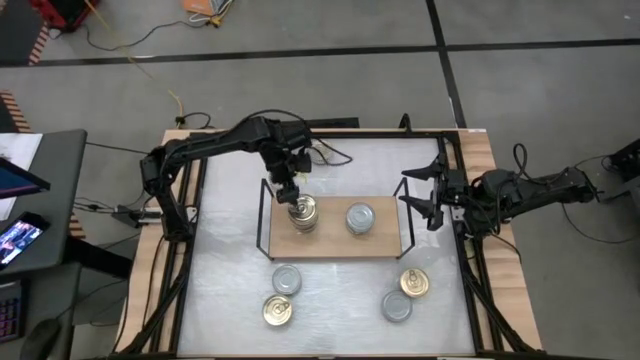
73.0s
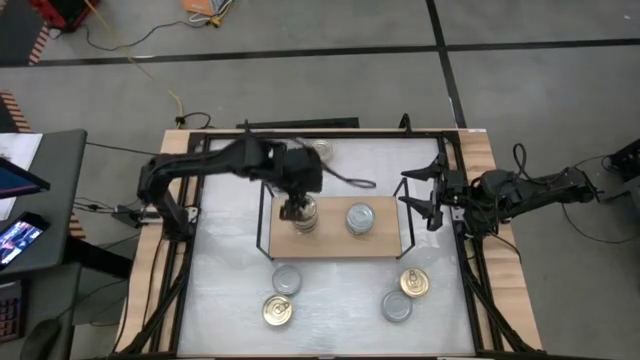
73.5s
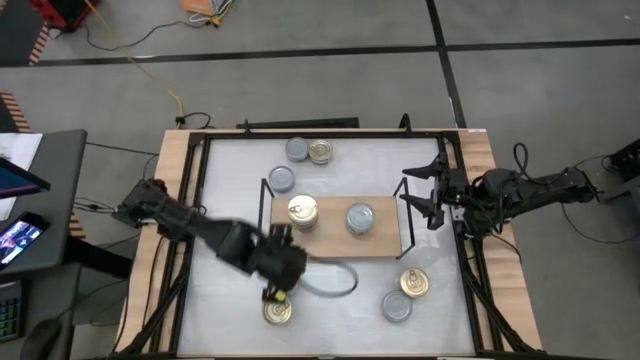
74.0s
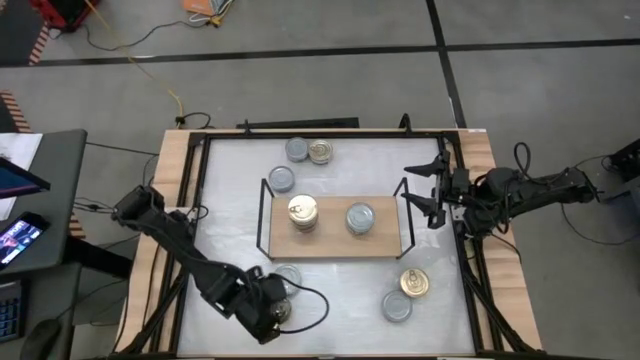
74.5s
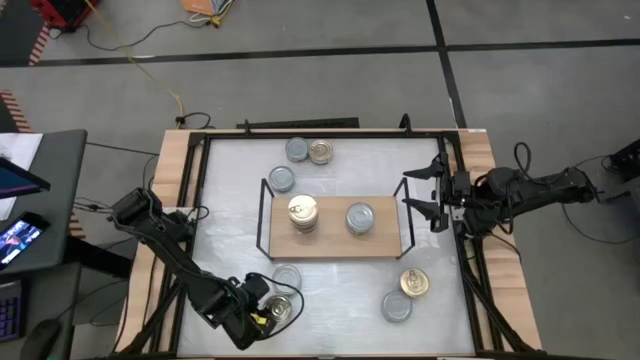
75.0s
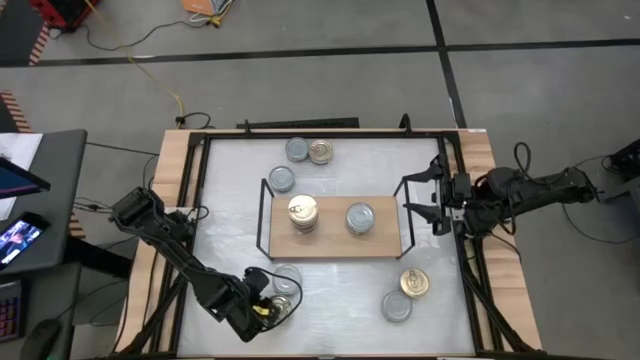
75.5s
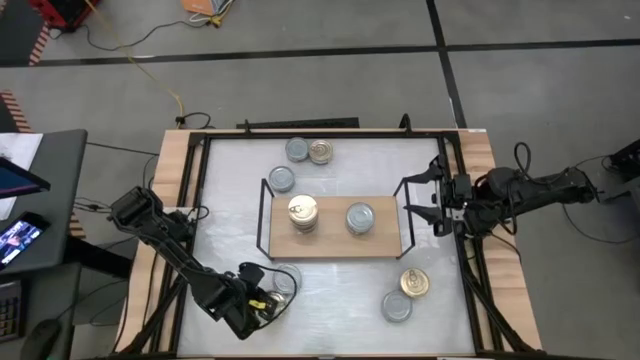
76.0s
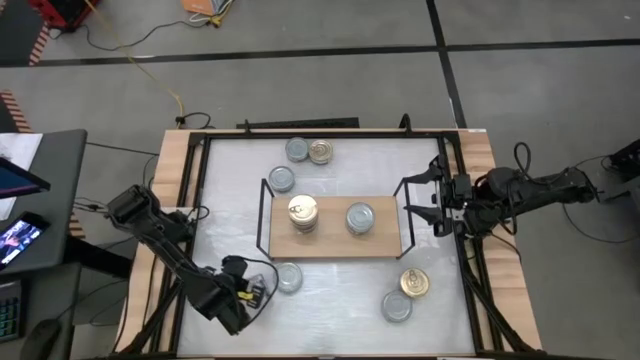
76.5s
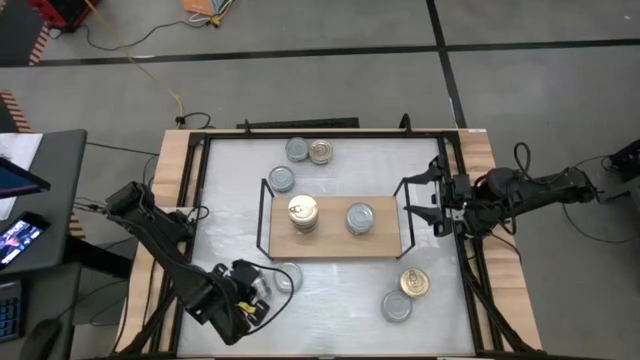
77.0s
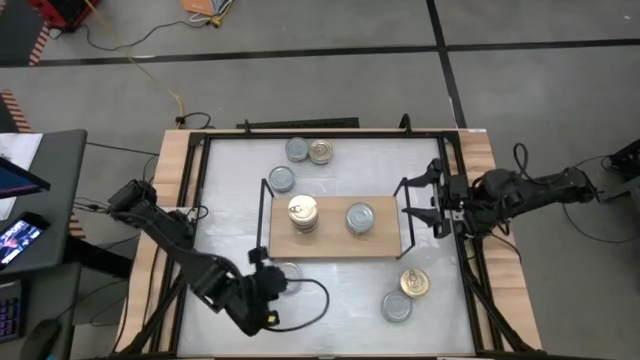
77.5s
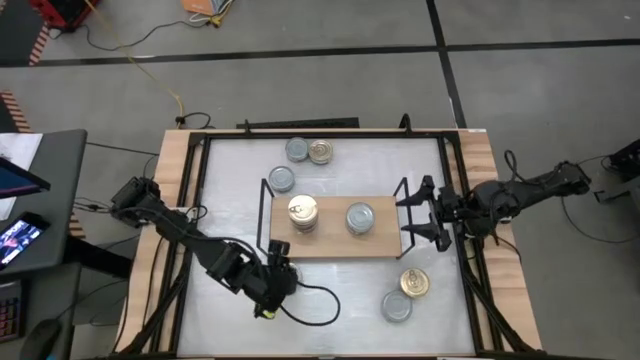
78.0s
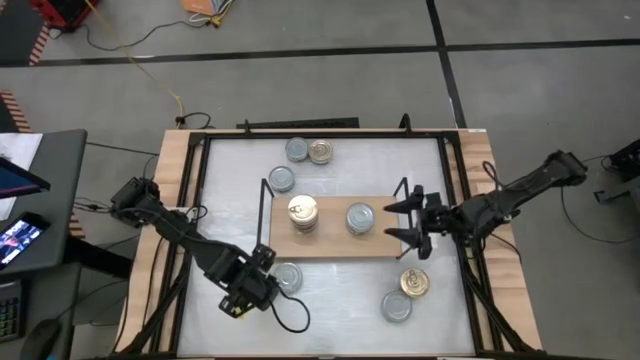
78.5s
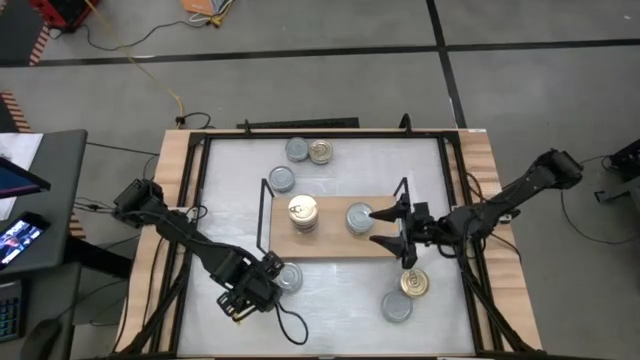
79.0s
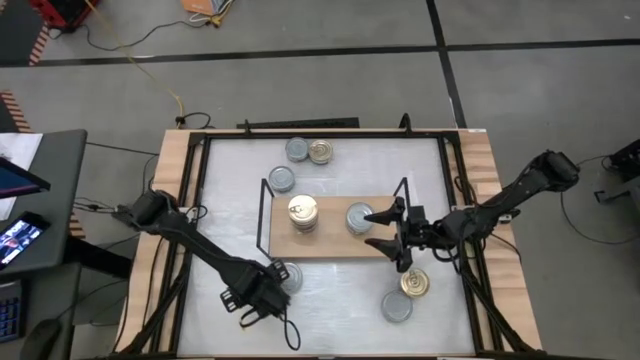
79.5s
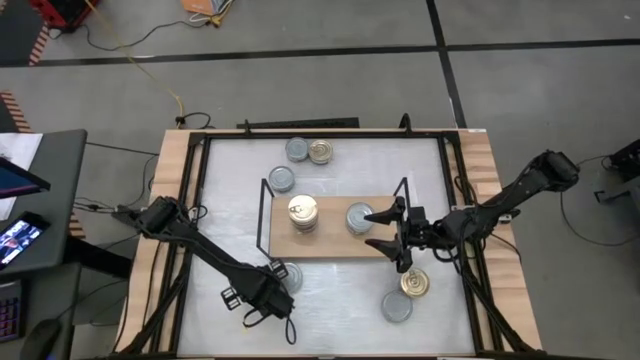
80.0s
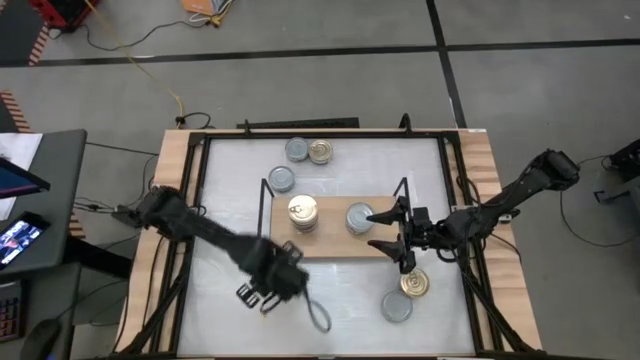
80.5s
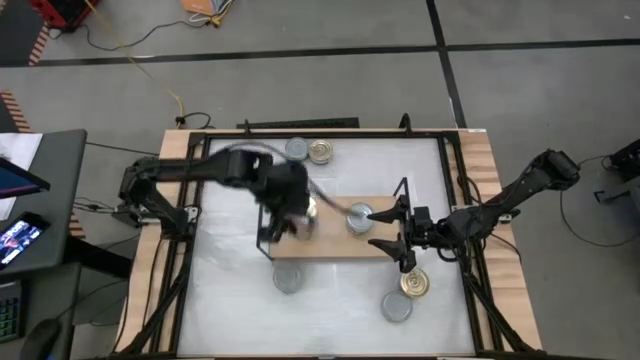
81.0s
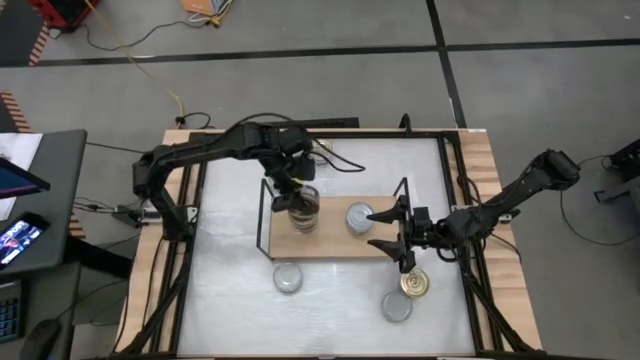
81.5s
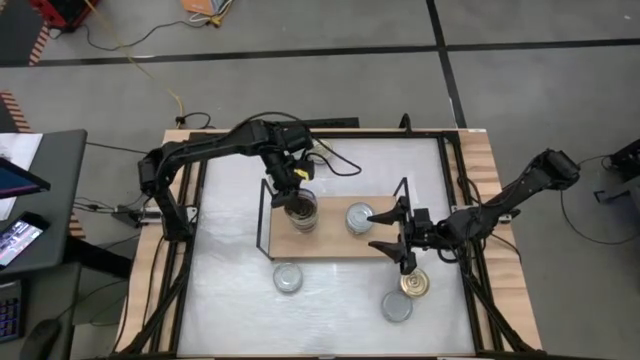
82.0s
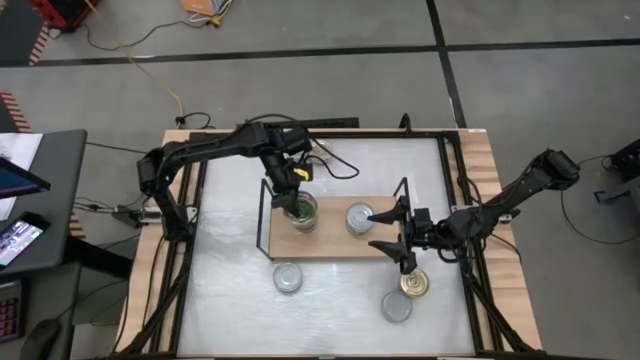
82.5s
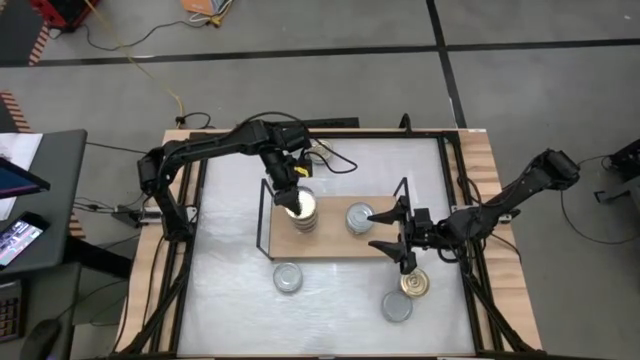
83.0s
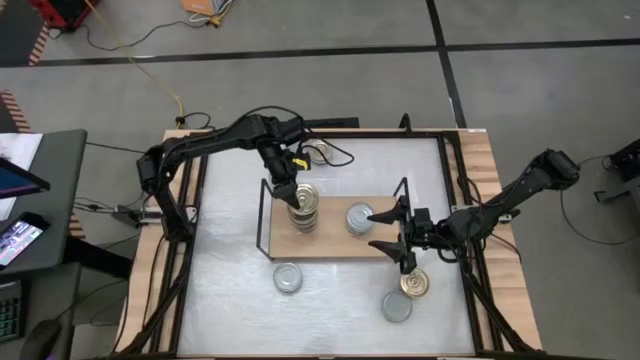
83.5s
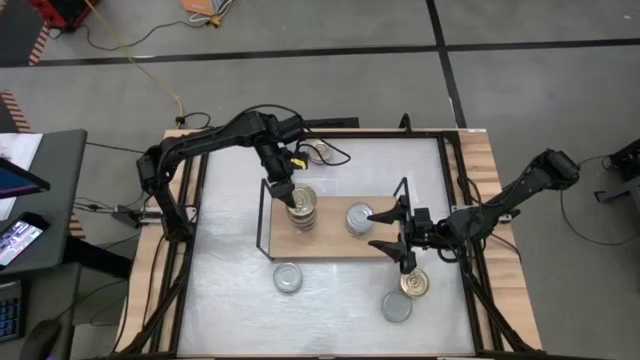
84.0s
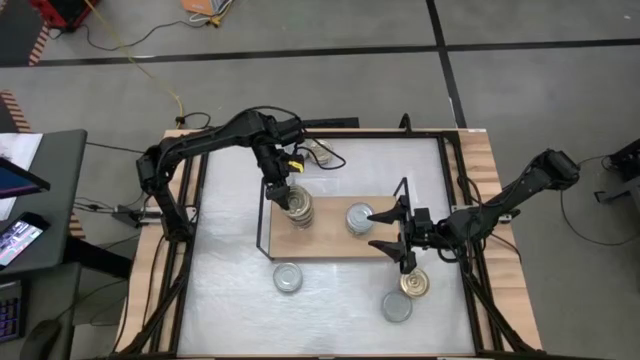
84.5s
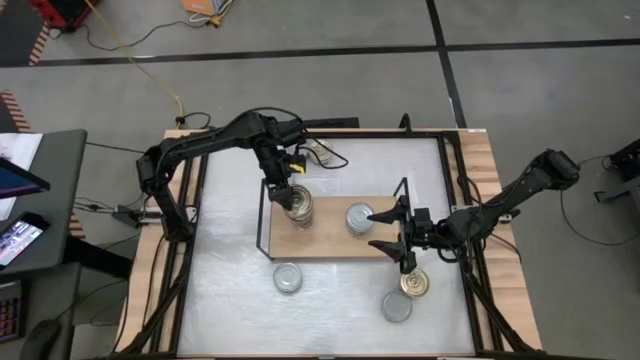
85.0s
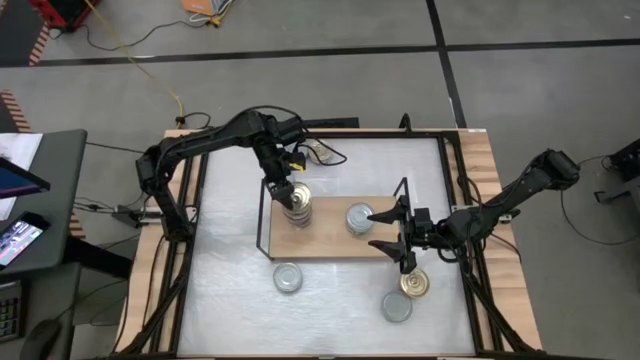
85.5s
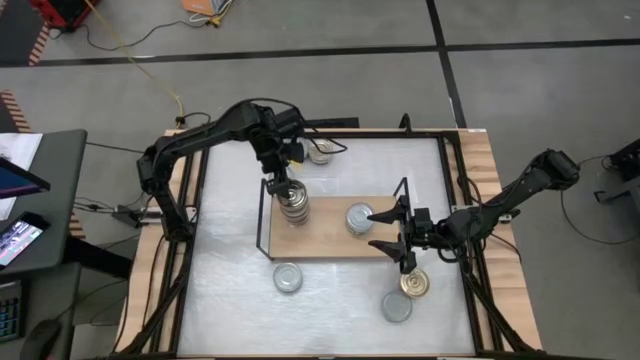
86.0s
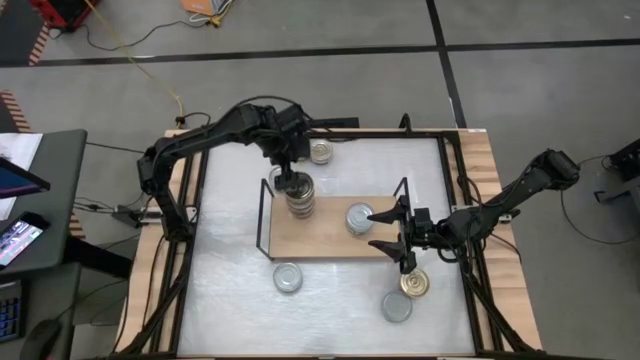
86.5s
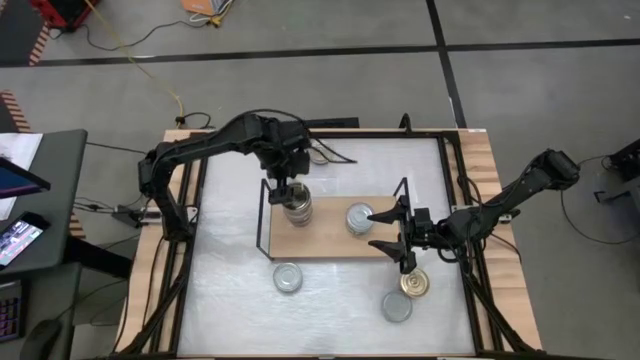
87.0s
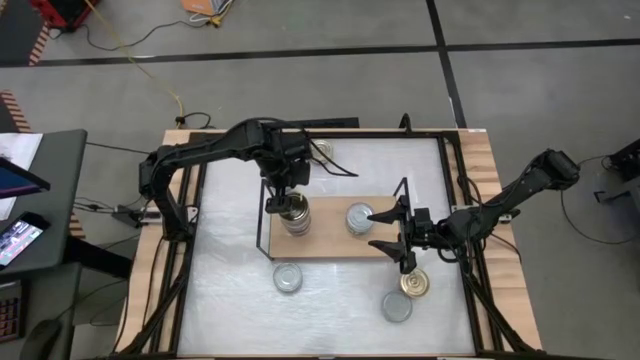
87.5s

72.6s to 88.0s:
Task: Stack canned seafood by type on shelf
Stack the blue tuna can on top of the blue tuna can on the shelf

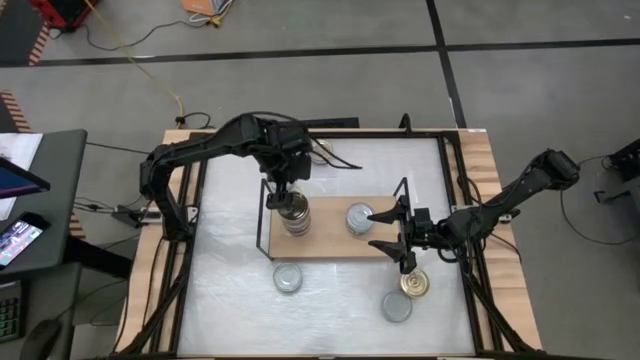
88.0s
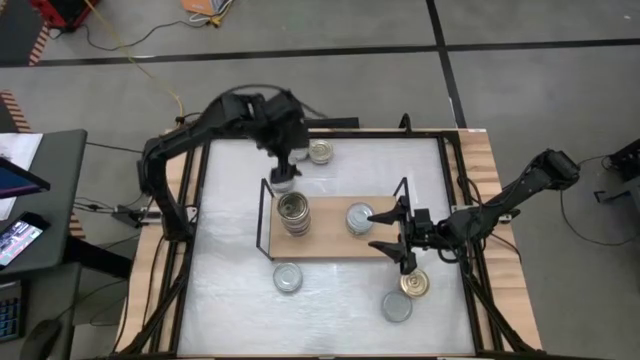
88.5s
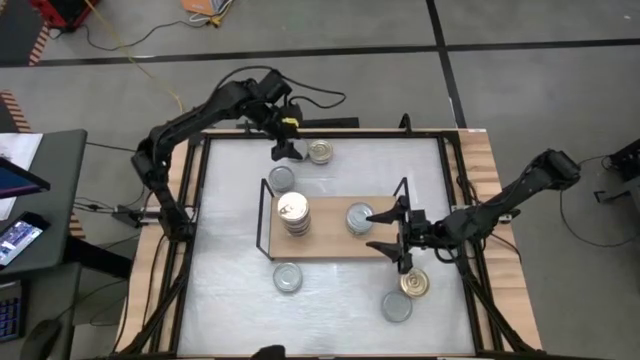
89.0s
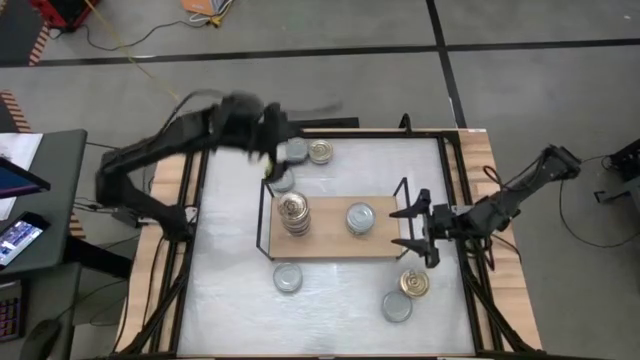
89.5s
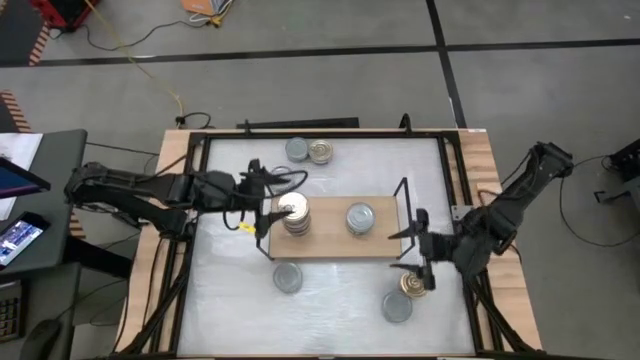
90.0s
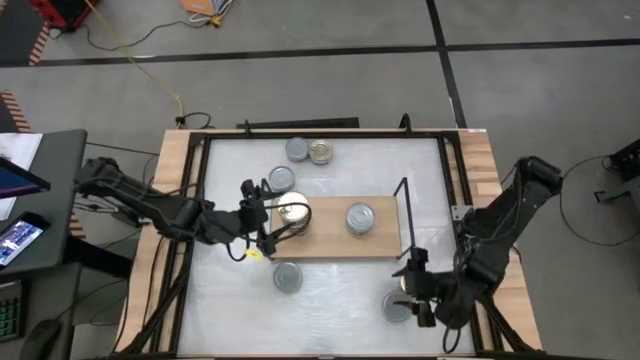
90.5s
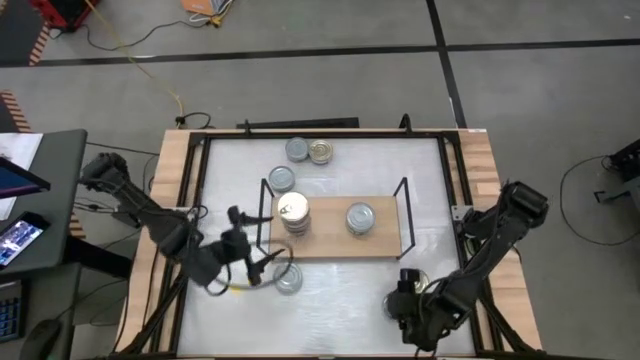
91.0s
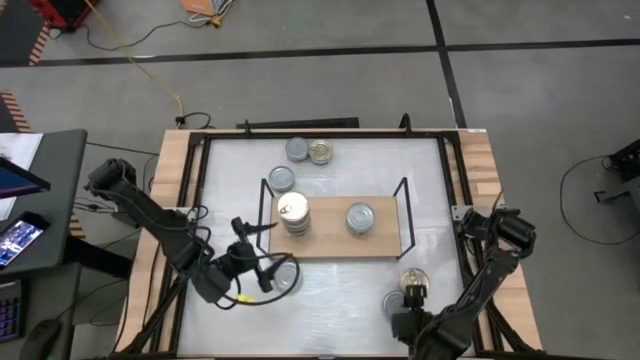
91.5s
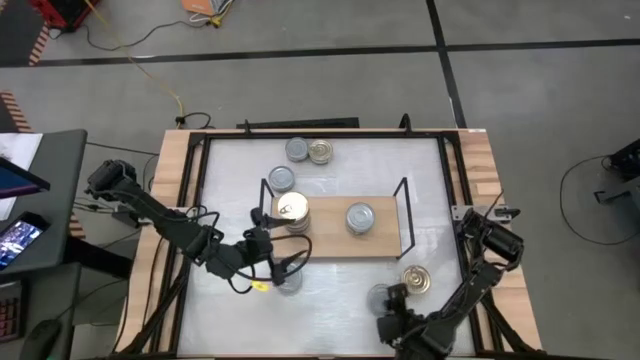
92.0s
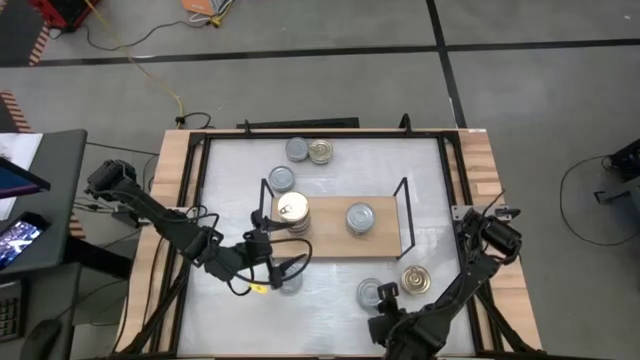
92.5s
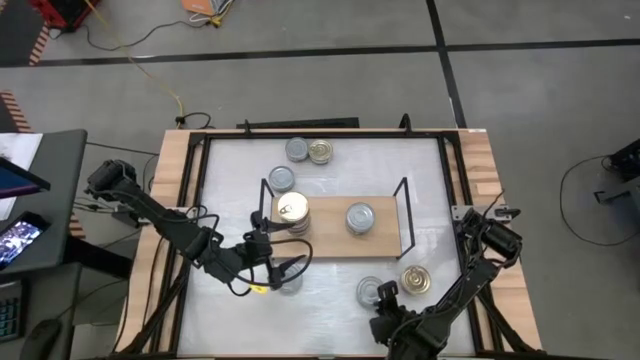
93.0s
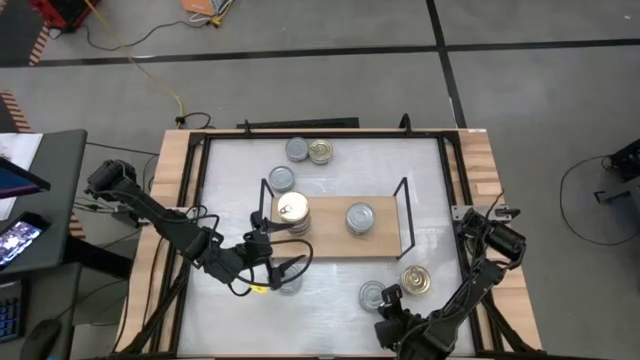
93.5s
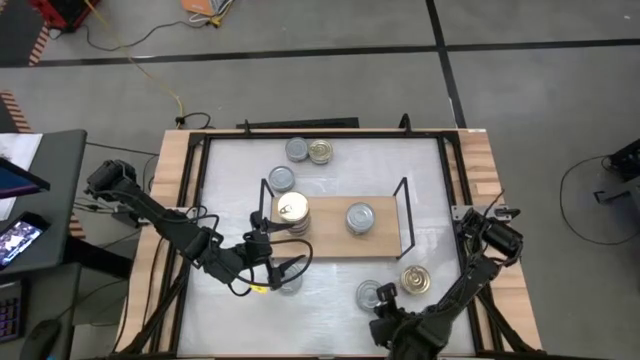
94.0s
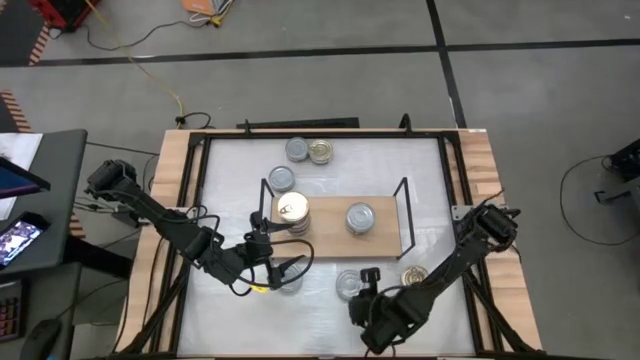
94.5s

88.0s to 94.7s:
Stack the green tuna can on top of the green tuna can on the shelf
